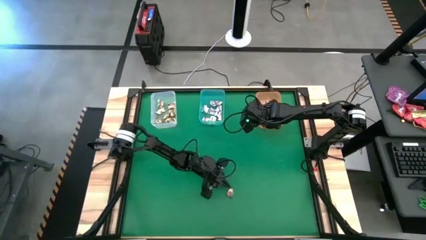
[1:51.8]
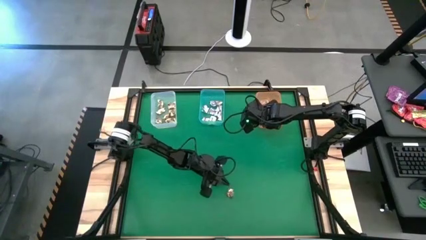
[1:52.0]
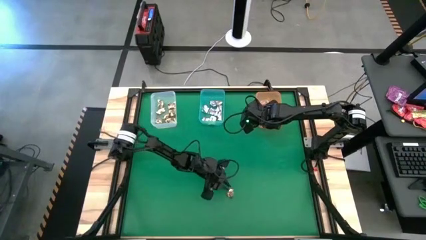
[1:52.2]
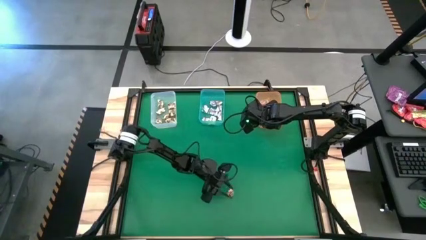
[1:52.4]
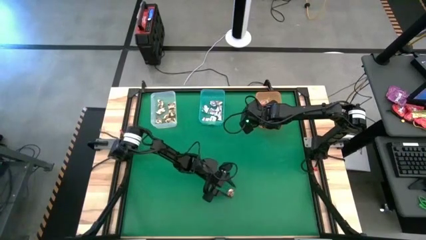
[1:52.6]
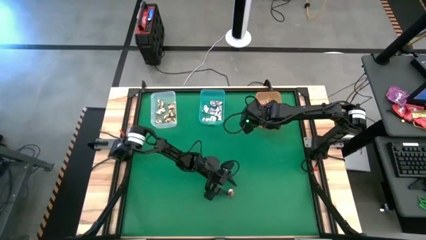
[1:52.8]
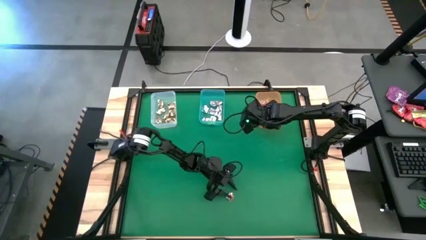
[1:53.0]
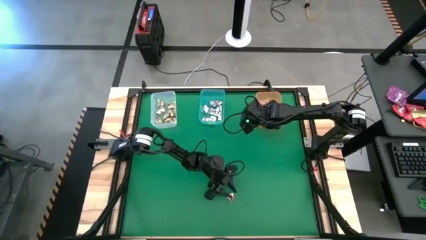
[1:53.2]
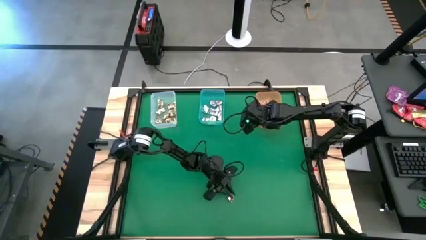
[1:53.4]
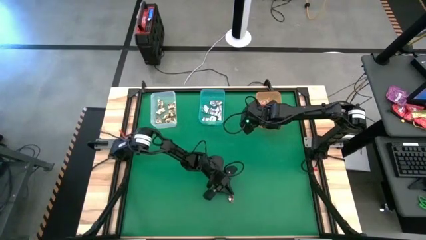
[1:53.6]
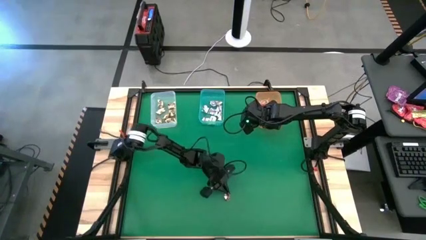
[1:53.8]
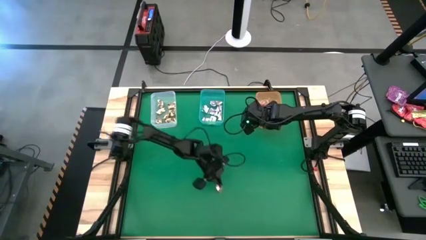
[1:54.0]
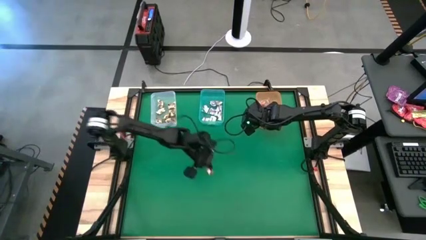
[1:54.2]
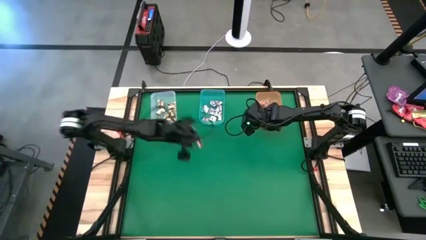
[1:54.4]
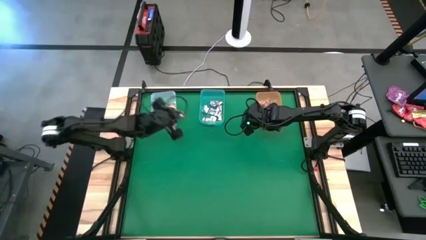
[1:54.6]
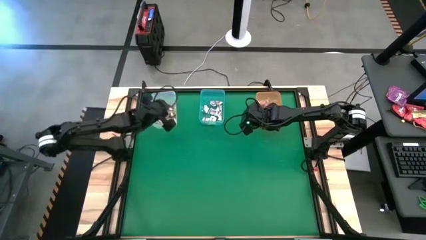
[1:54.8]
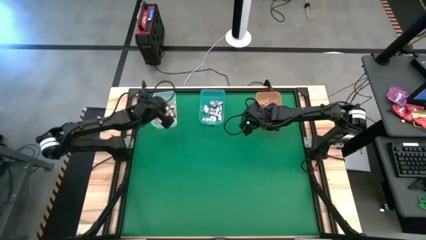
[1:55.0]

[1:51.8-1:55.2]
Task: Sort candy by brand, put in halloween buckets
Put the gold wrap candy into the white bin

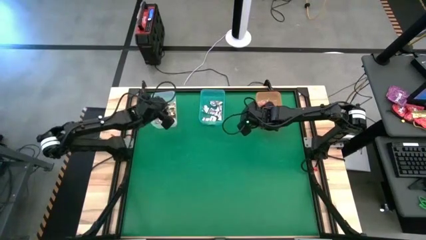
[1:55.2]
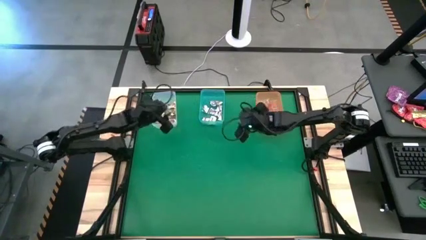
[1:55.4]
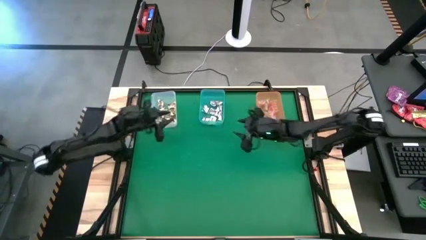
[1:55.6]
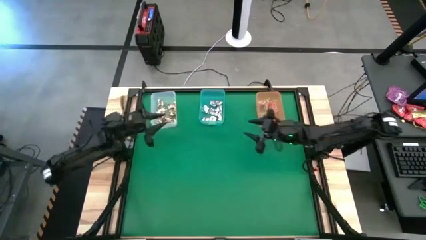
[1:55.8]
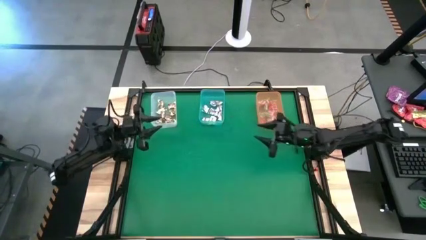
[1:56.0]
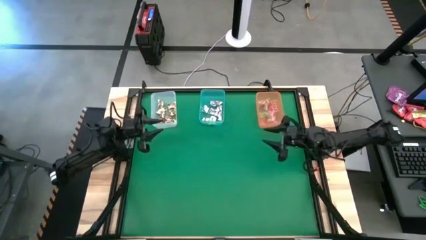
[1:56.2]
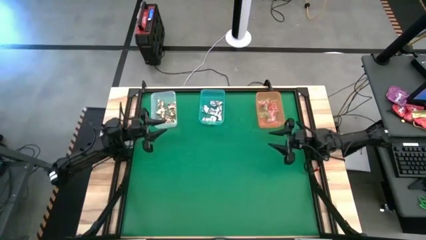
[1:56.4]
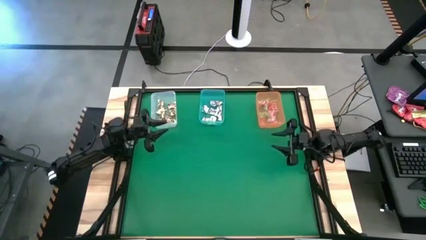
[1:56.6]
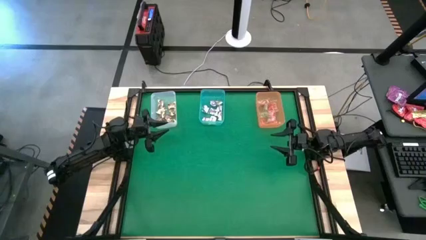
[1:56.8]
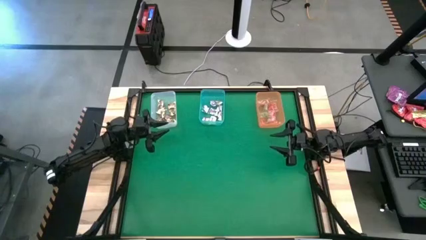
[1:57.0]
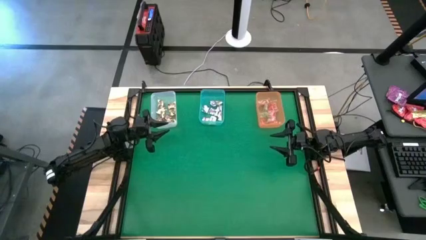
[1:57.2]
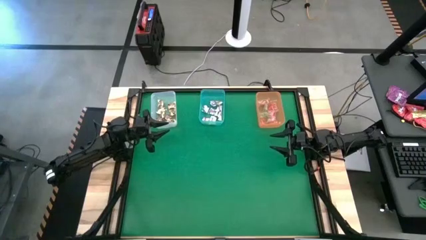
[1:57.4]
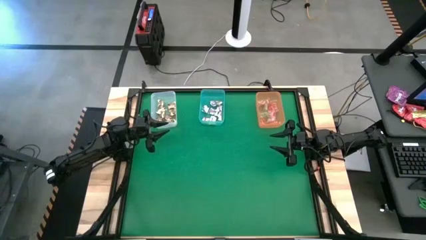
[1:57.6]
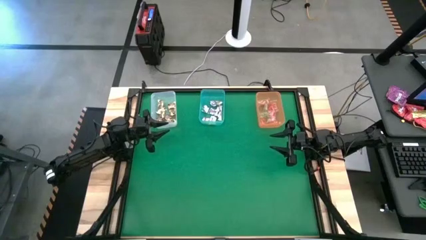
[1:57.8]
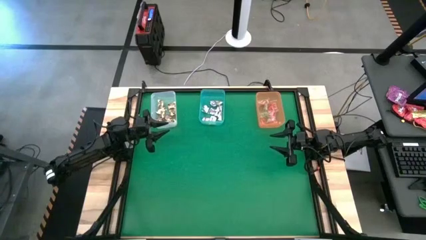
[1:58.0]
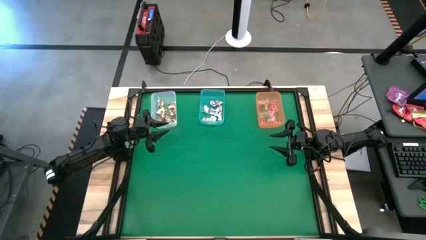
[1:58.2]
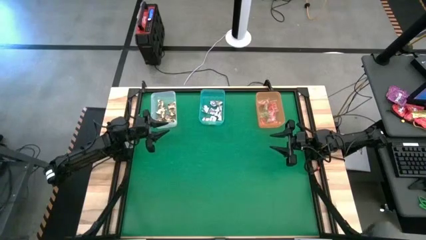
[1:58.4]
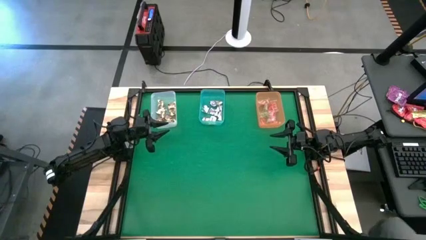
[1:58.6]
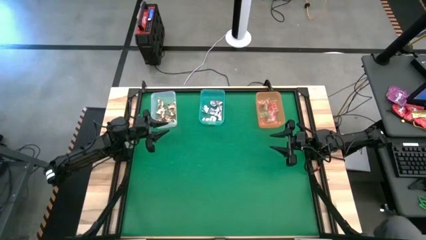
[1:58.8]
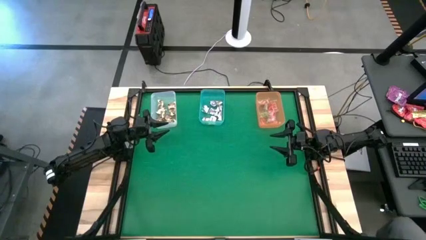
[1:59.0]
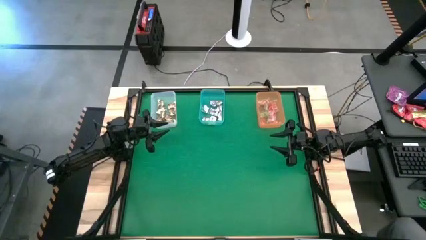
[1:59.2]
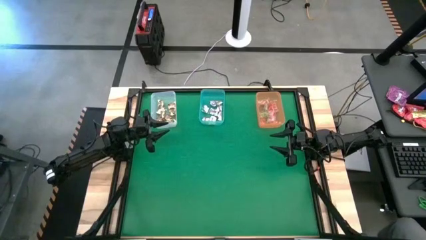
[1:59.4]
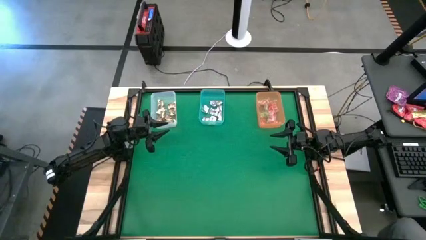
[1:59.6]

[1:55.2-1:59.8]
Return to Home Position

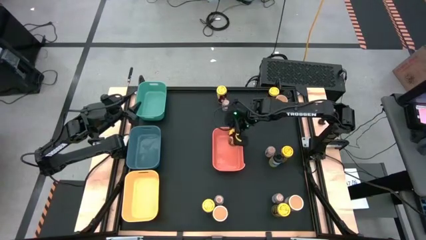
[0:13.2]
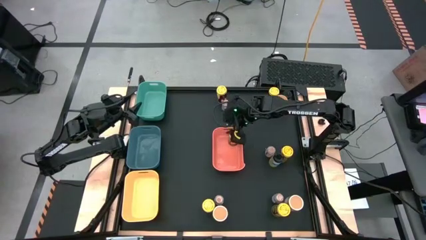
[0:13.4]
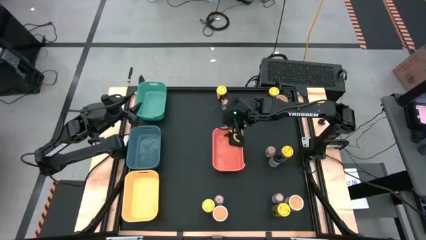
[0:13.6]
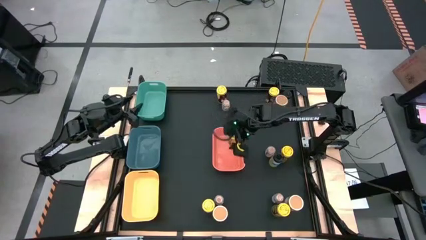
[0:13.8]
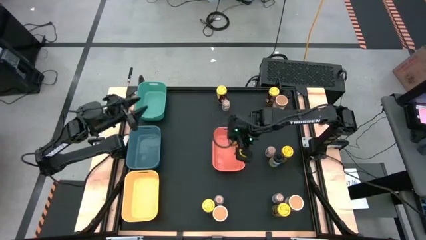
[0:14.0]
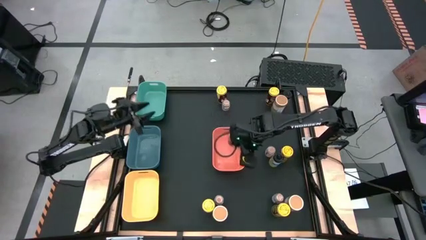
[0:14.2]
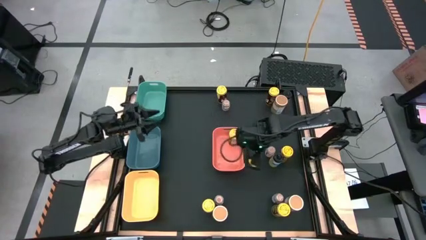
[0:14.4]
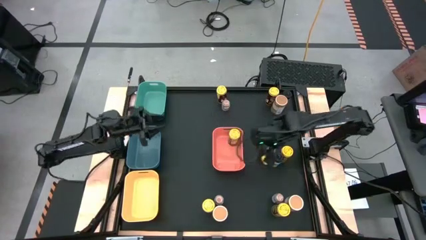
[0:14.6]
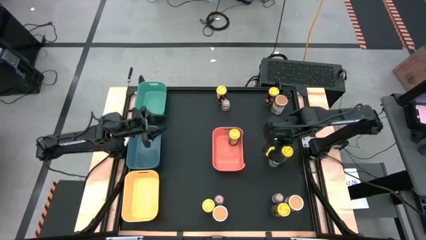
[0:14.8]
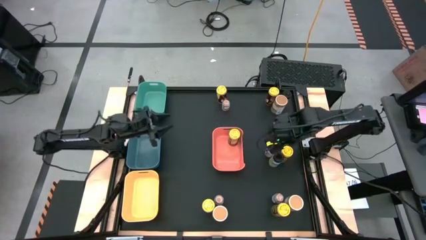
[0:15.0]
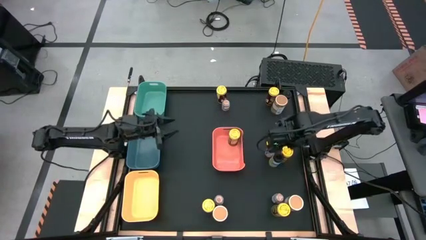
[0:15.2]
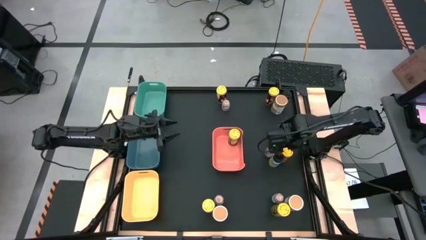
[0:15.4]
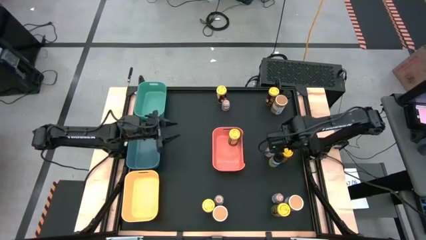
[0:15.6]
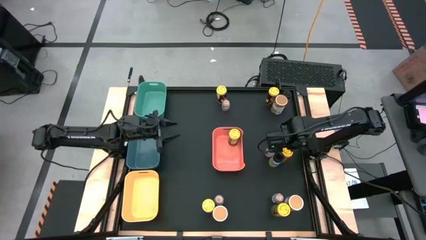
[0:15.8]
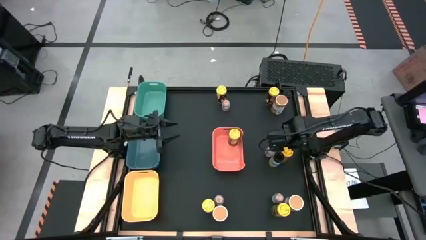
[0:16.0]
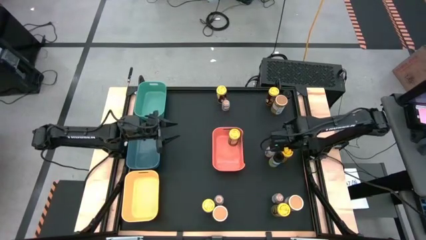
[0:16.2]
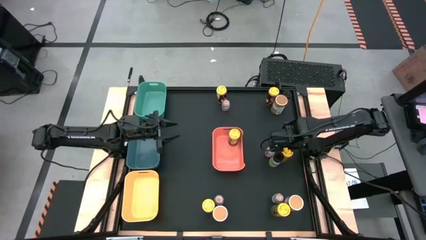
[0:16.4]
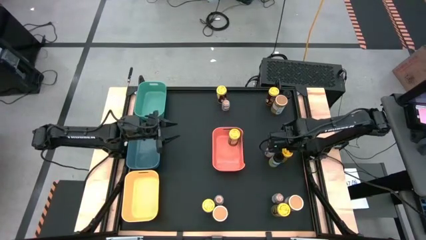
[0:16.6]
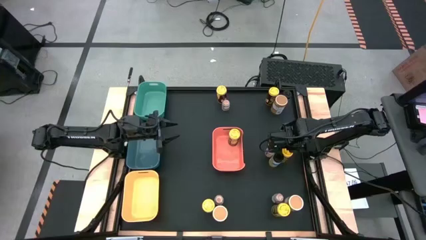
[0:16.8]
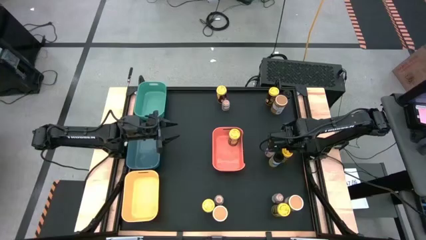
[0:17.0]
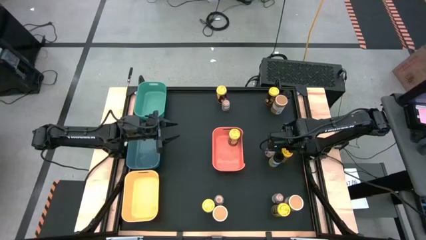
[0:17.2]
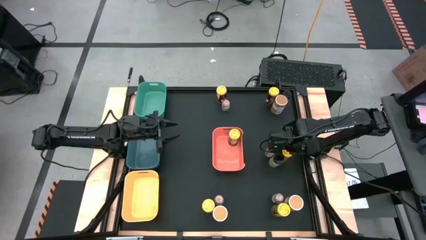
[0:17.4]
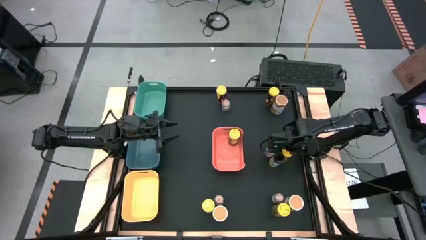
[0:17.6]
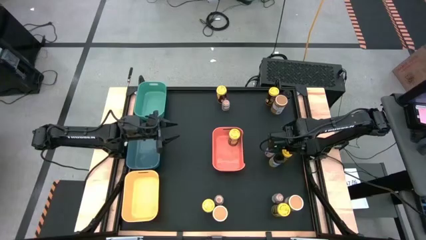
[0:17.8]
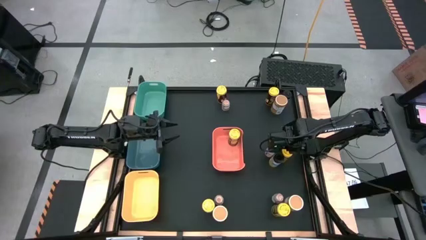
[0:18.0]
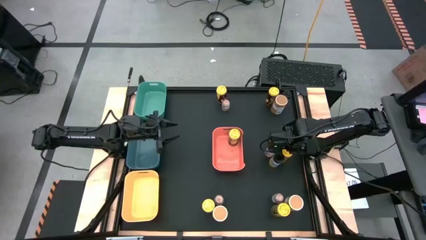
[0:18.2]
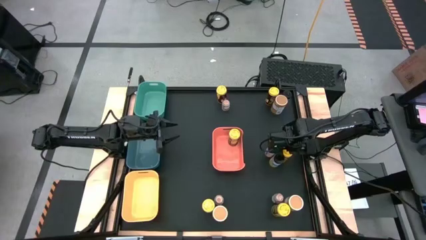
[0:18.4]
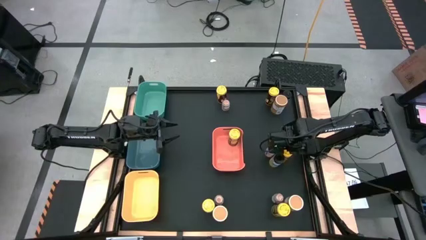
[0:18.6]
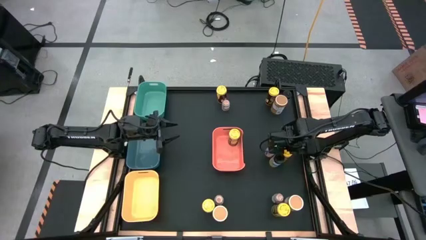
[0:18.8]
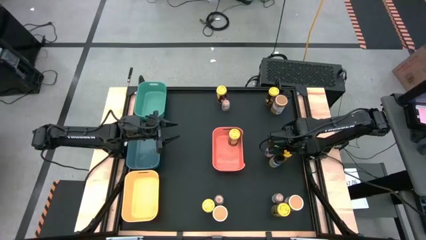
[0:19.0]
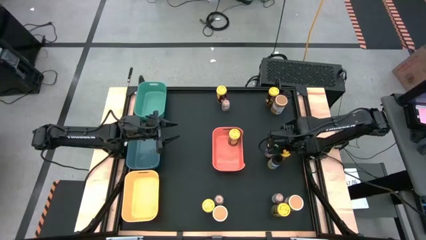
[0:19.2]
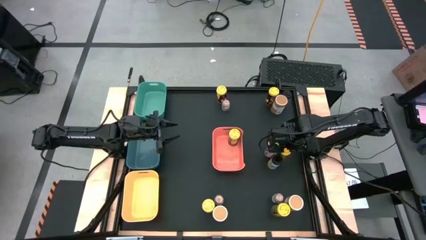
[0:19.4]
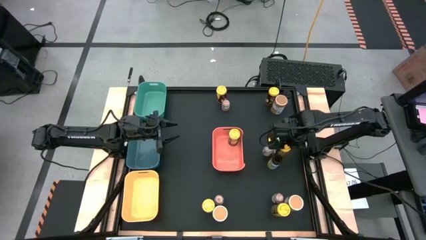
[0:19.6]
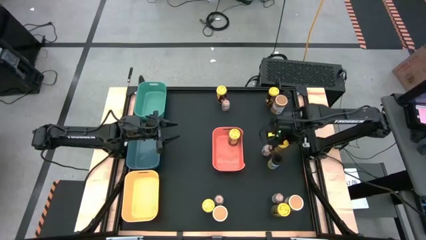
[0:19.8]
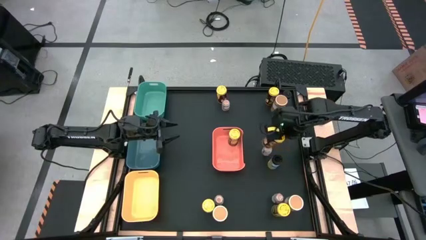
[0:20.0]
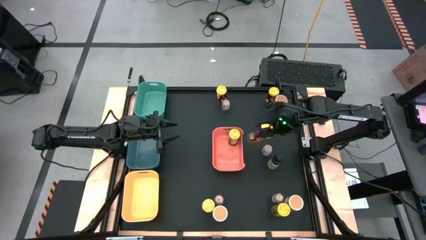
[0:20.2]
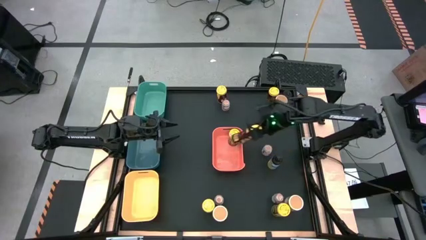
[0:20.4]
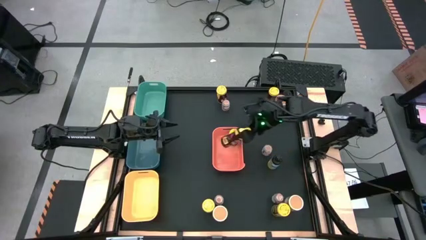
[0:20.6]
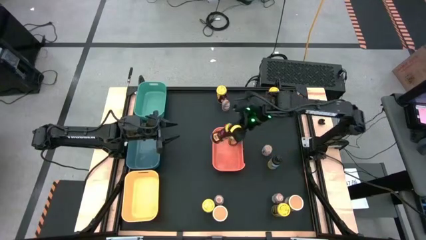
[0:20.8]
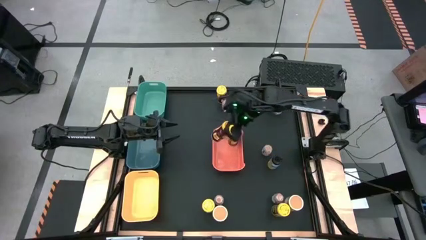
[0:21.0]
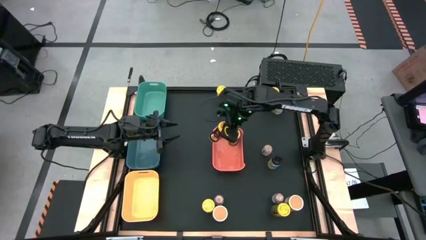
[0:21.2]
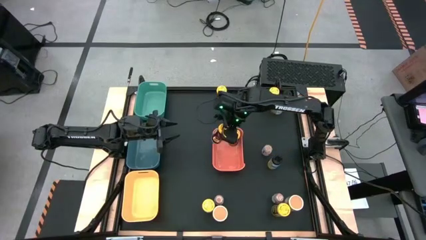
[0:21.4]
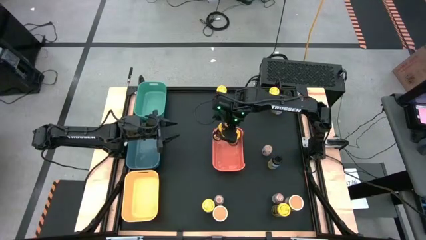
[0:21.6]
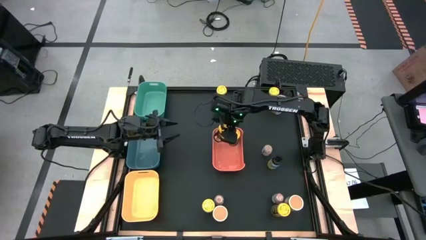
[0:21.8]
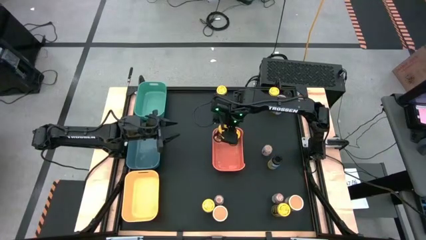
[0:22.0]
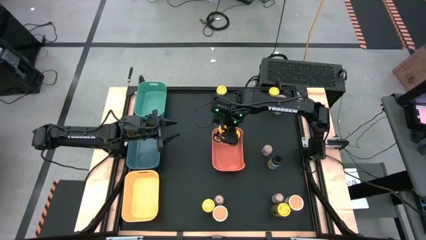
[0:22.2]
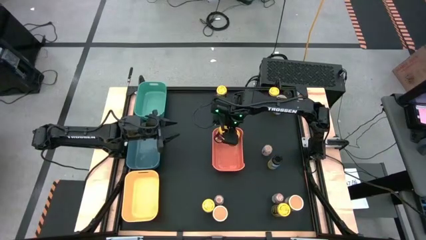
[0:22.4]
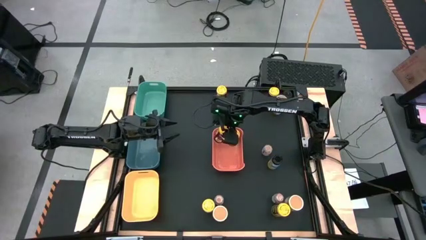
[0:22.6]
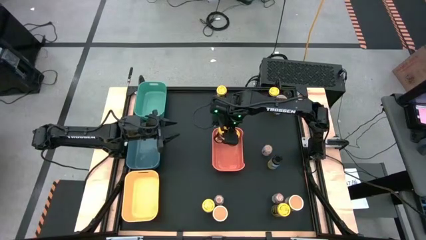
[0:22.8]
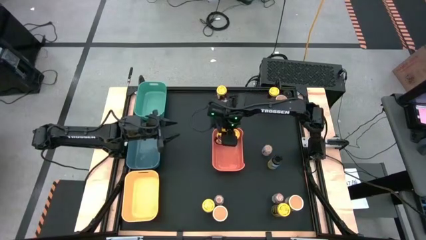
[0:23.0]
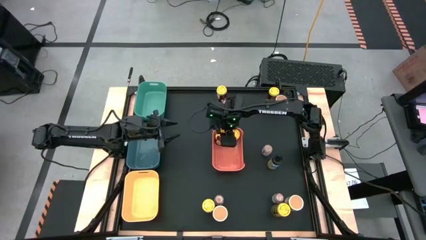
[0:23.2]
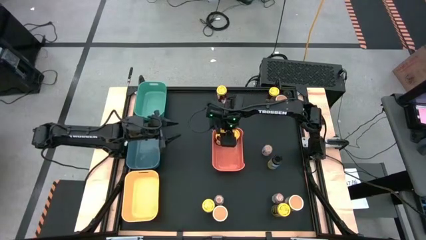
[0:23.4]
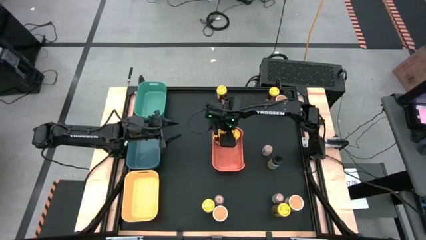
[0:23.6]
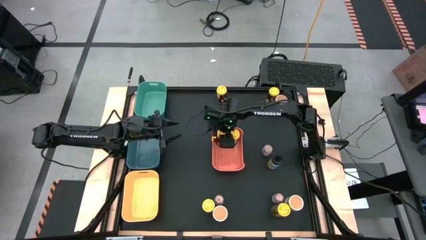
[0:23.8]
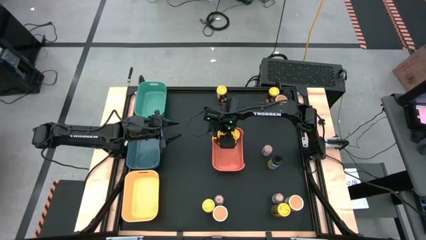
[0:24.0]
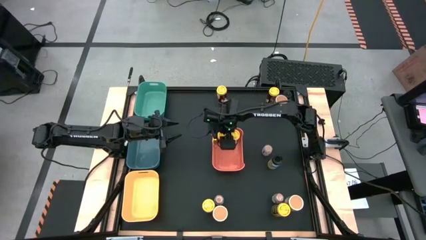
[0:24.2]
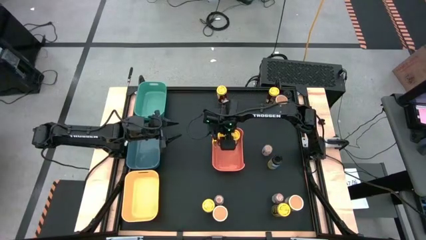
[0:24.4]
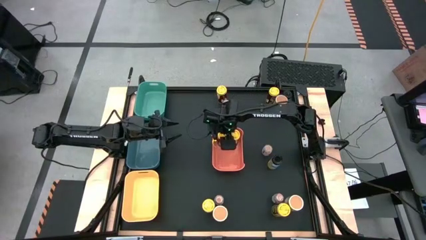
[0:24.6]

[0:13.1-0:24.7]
Task: Sort spices by type
Put the yellow seasoning can in the orange bin
